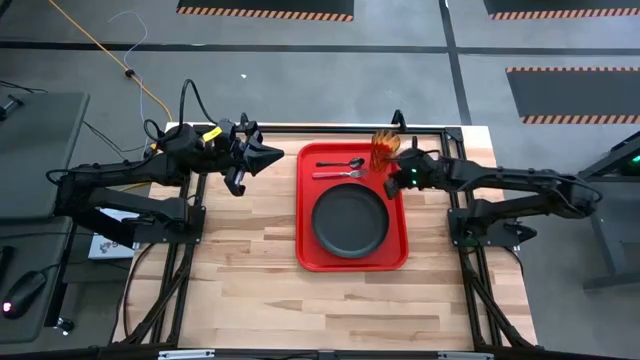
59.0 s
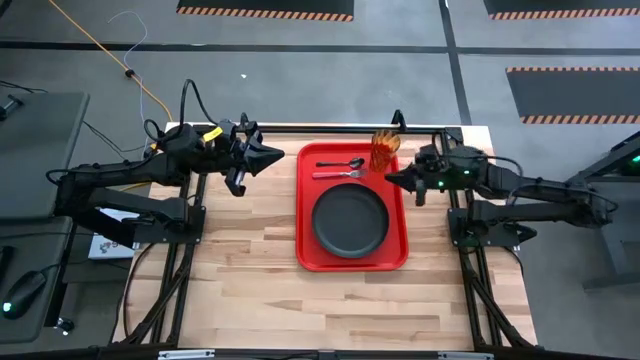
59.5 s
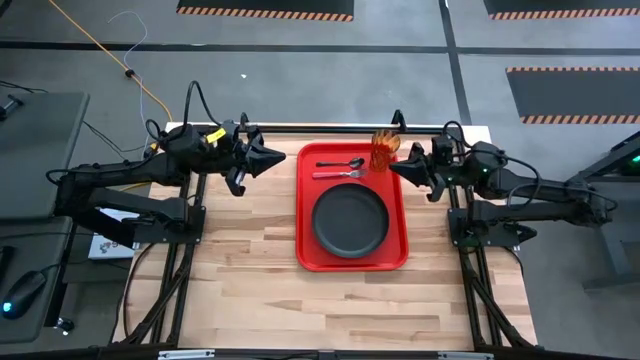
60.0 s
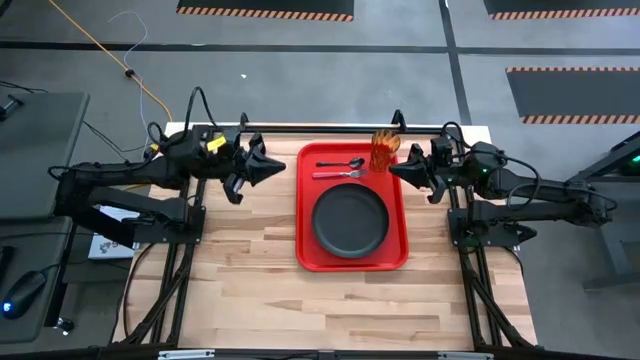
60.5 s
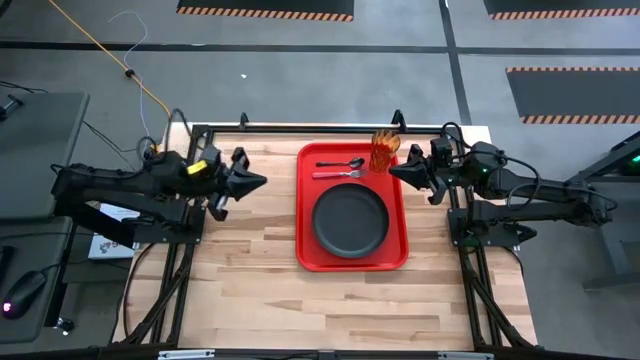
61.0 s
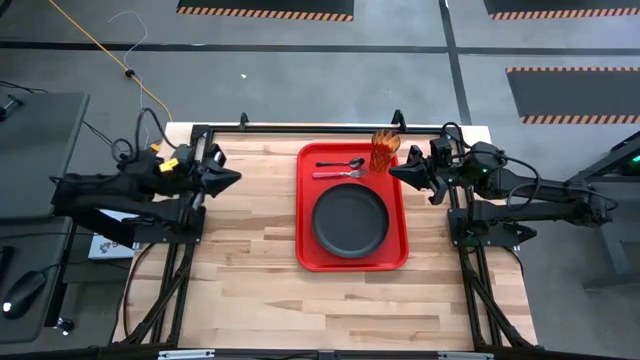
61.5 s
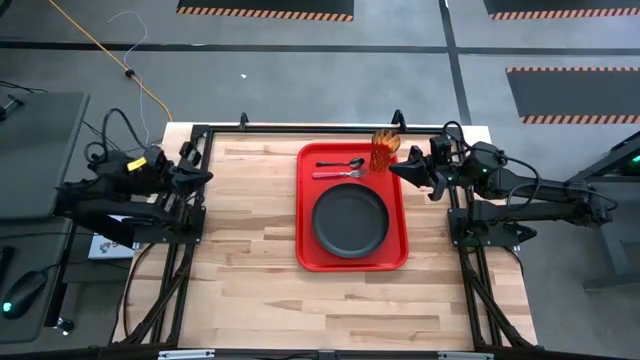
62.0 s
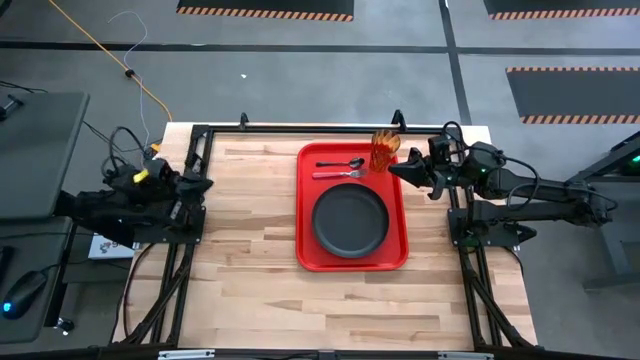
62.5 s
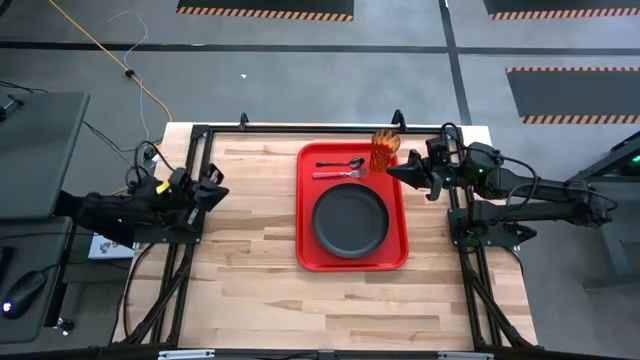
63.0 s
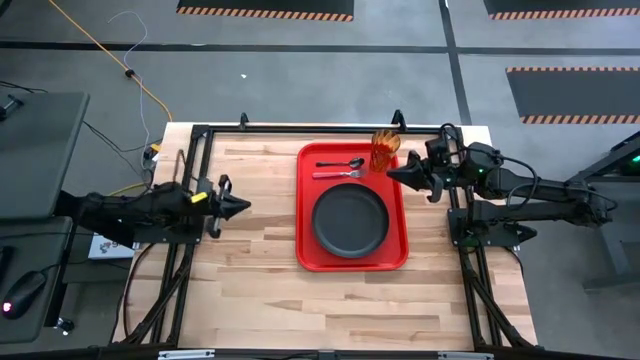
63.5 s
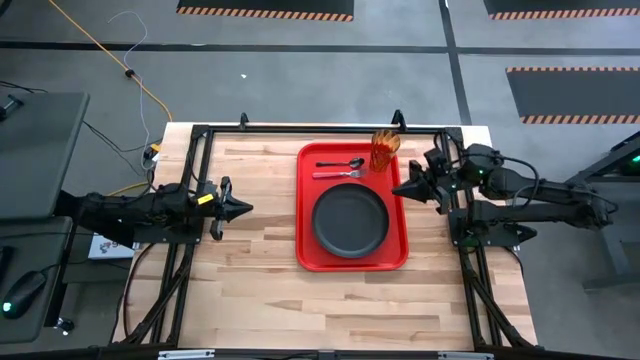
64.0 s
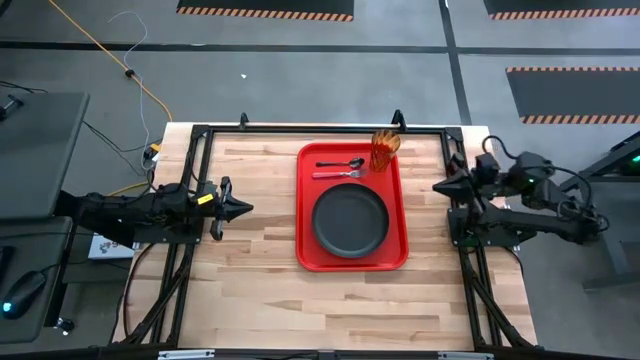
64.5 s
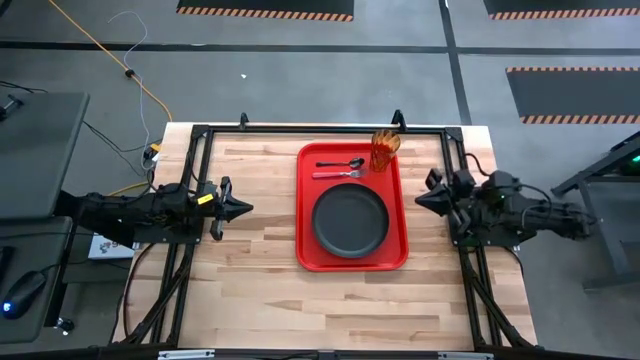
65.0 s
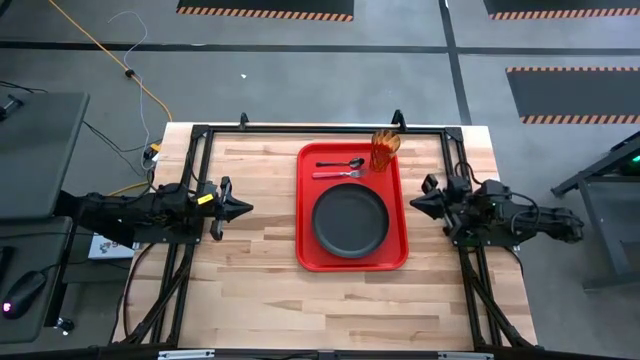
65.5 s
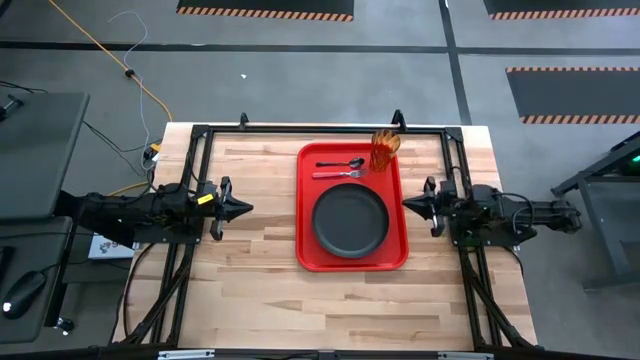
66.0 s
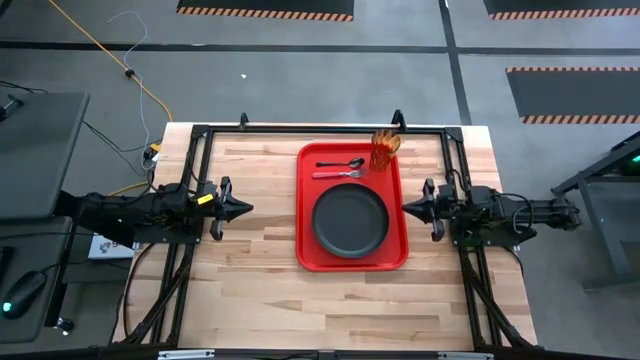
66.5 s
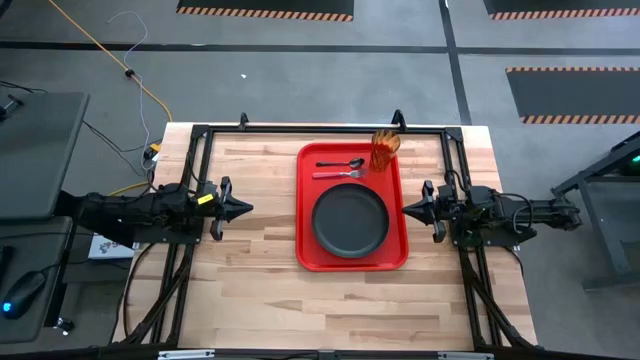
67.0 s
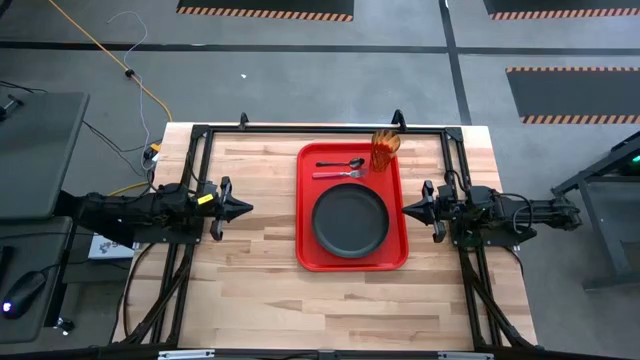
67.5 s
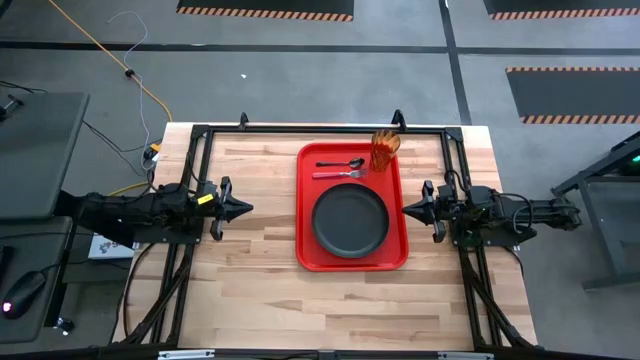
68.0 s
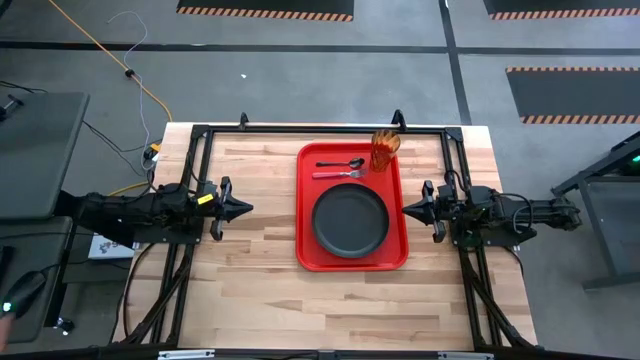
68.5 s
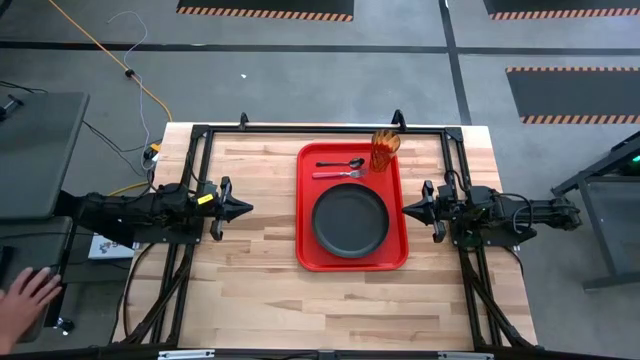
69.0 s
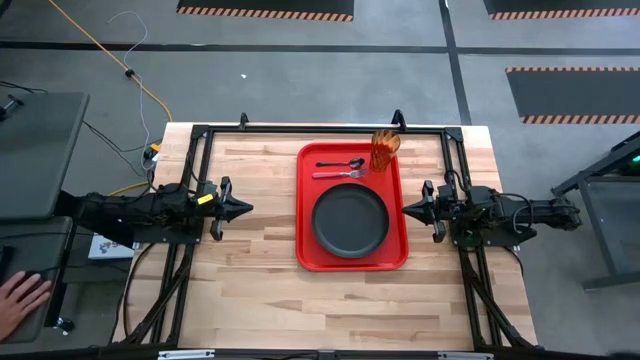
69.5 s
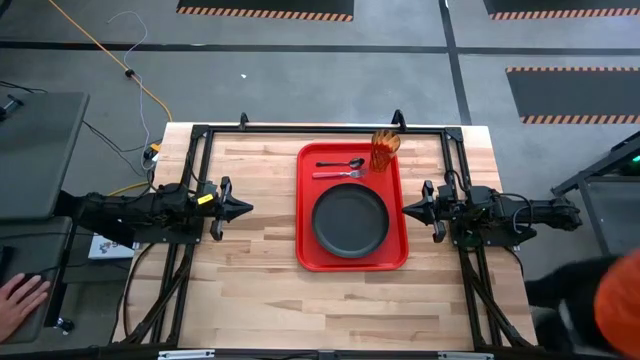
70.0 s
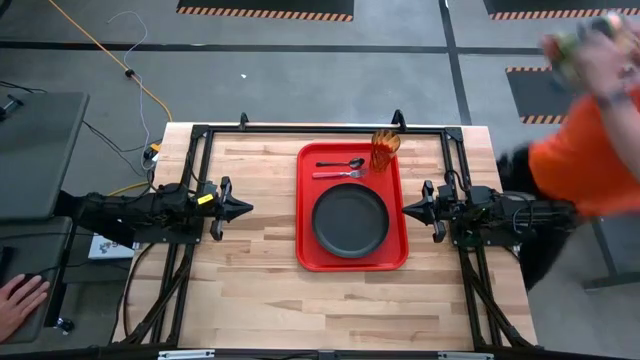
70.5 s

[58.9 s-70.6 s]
Task: Pick and place plate/cup/fork/spoon on tray
Return to Home Position

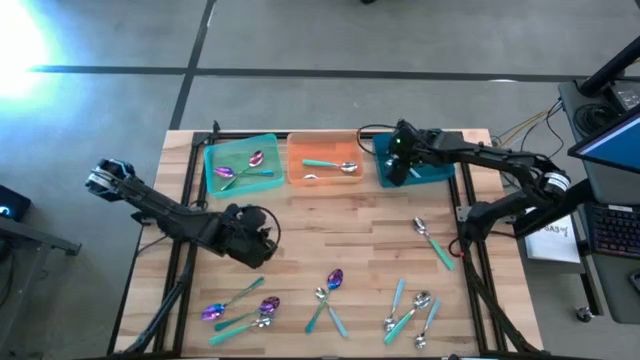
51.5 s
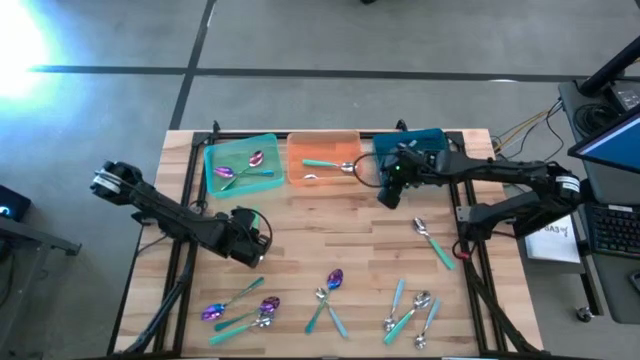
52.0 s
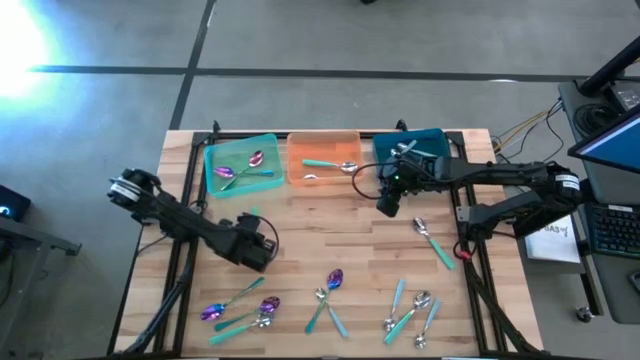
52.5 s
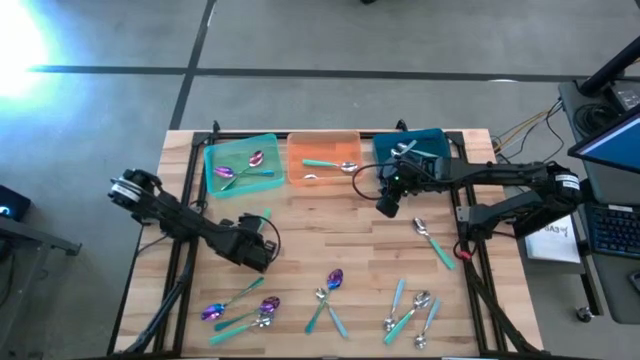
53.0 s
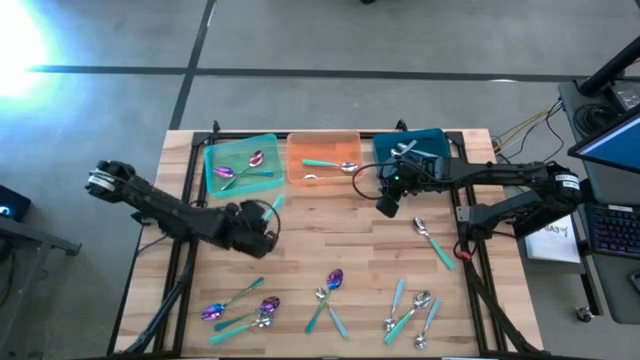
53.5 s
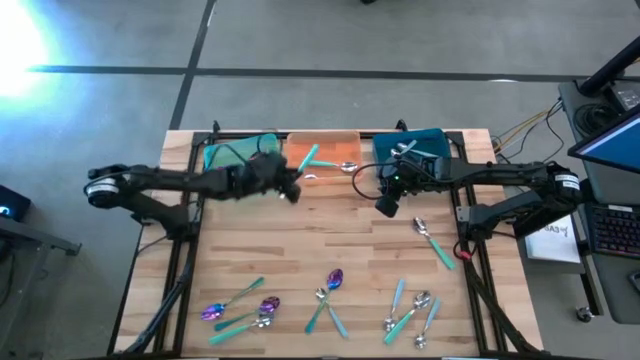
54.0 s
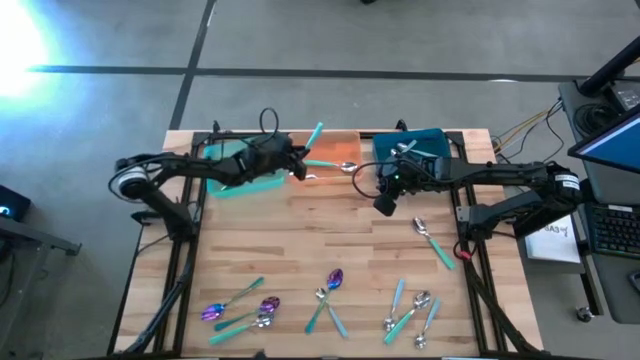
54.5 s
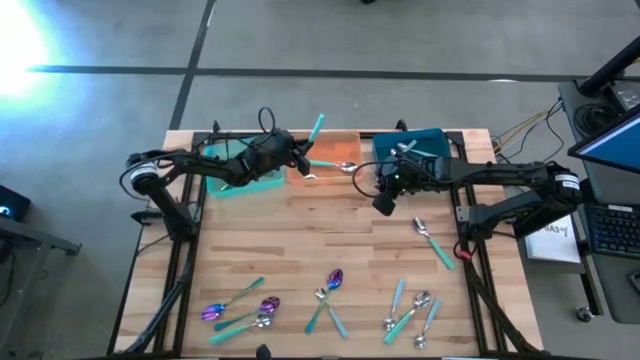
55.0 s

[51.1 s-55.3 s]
Task: Sort silverware by color (type)
Put the green spoon into the orange bin

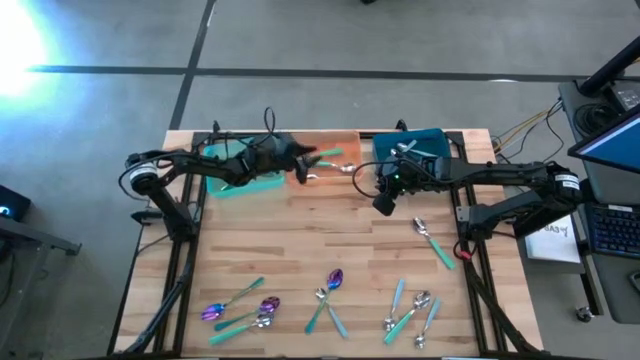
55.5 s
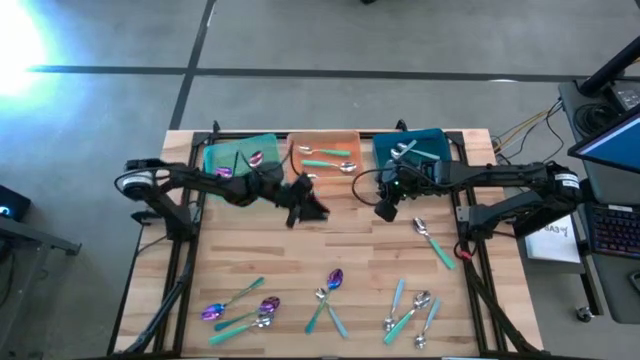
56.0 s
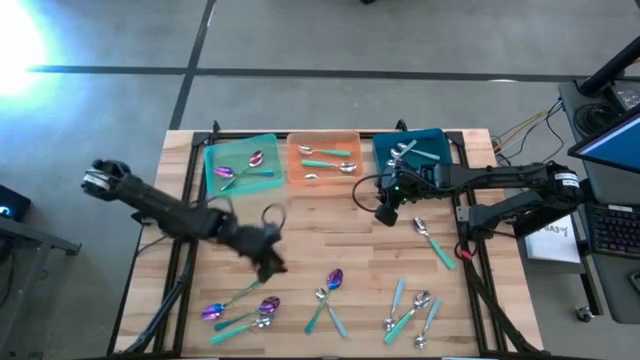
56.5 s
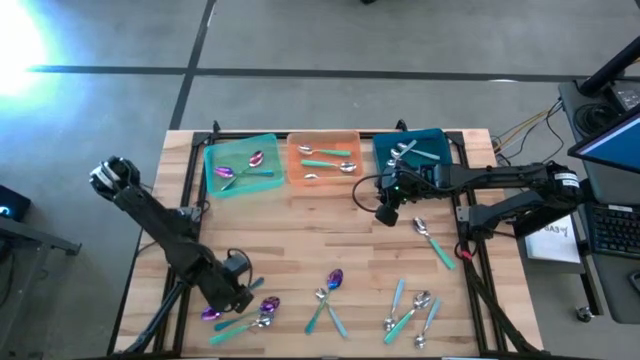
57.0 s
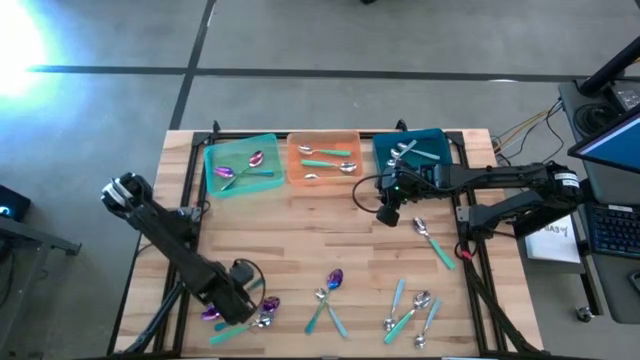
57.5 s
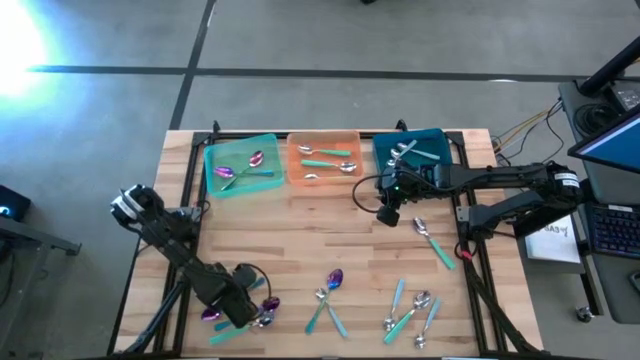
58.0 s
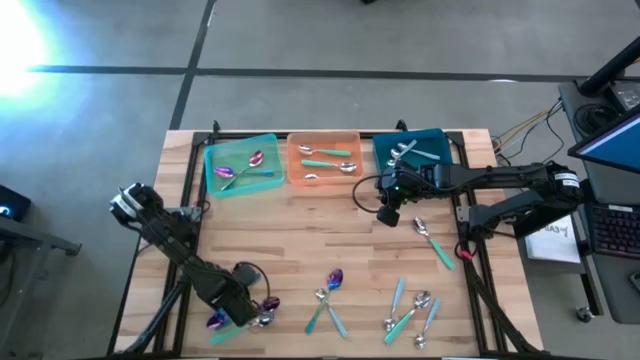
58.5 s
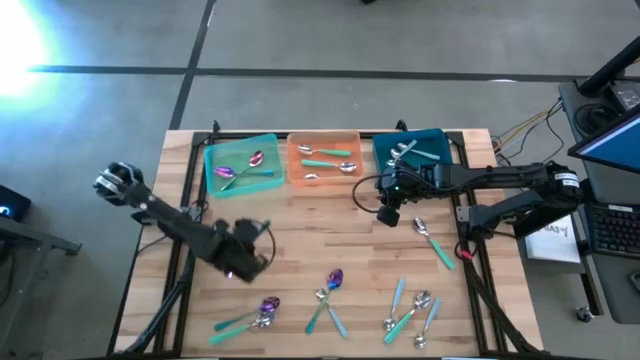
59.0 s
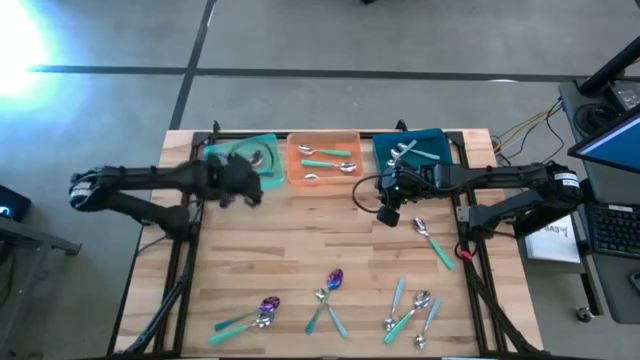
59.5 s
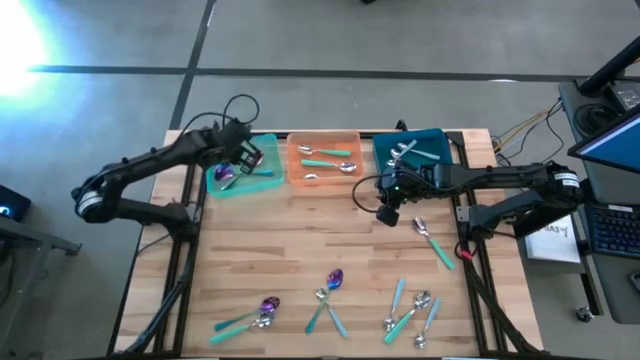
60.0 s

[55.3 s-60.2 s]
Put the blue spoon into the green bin
